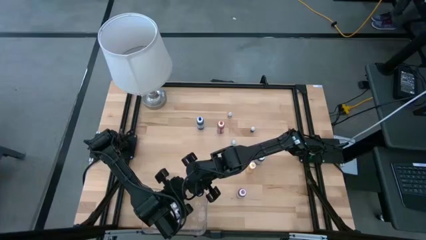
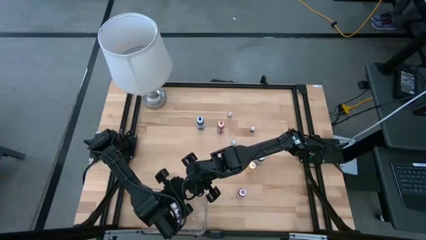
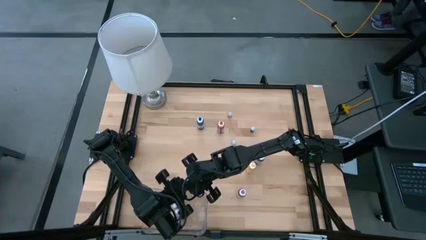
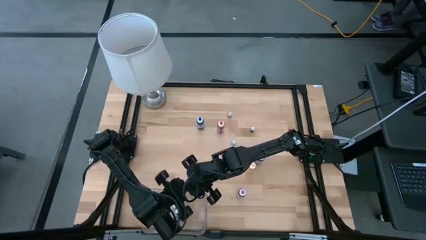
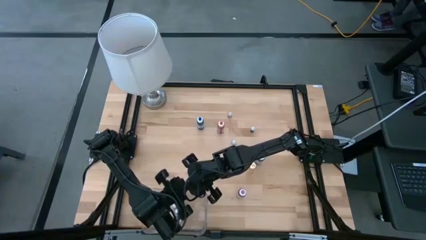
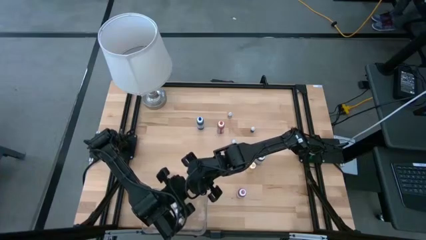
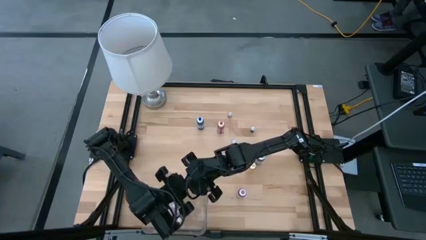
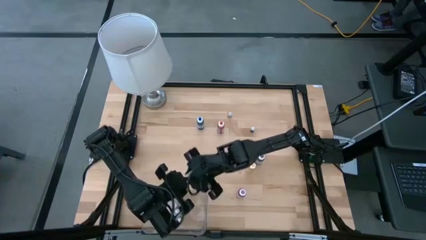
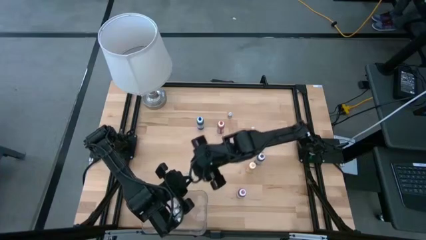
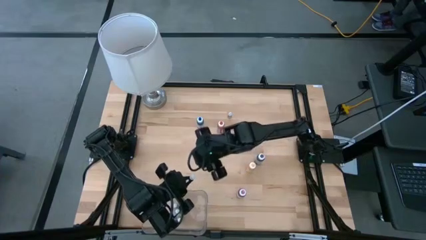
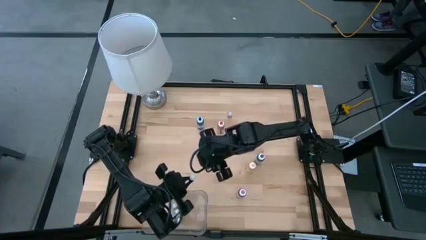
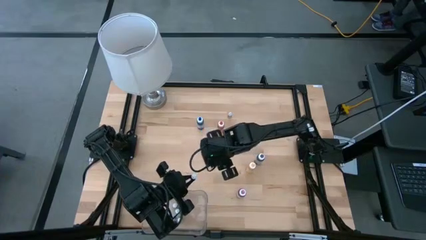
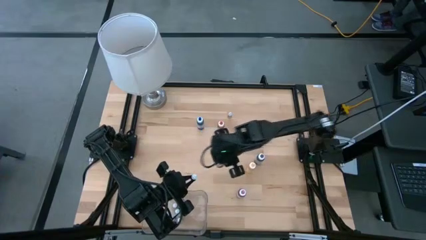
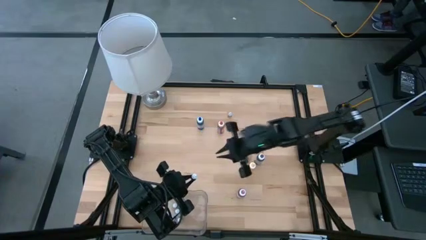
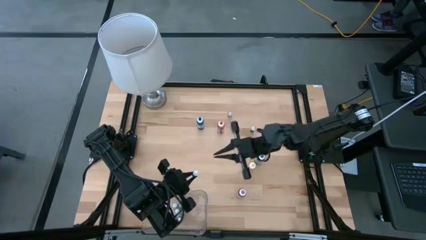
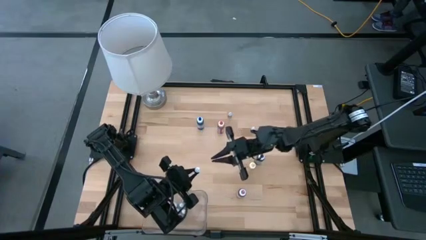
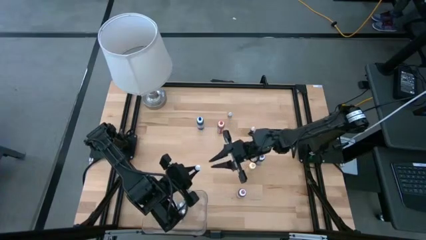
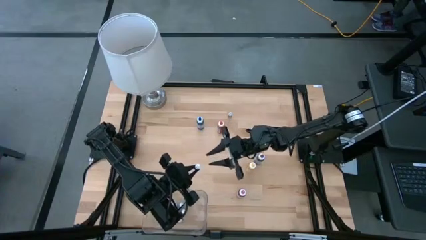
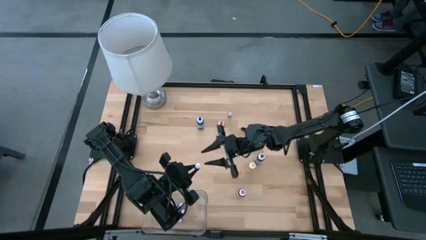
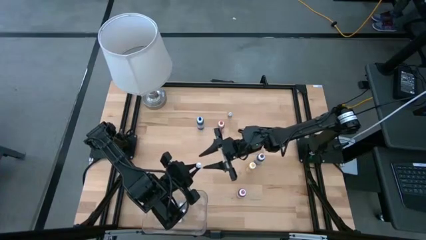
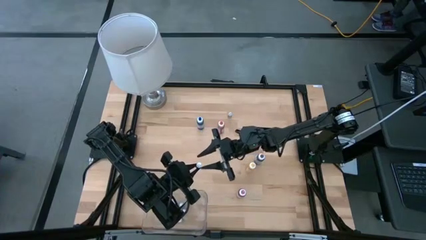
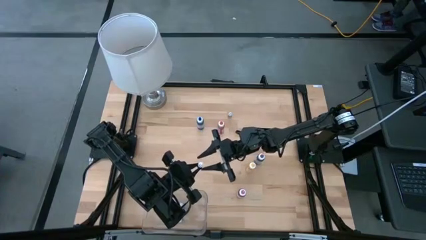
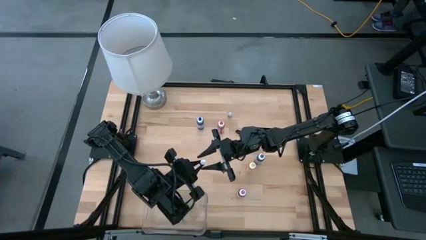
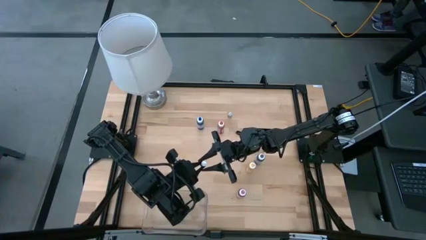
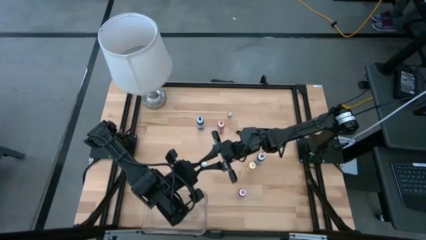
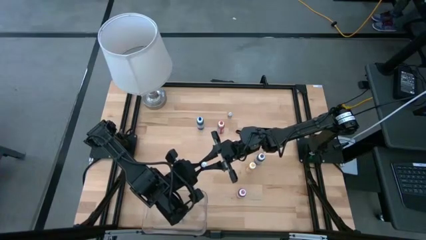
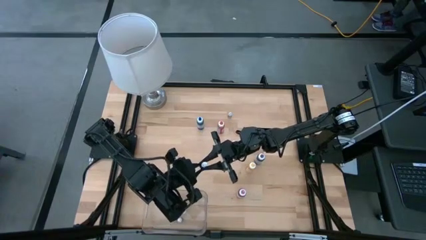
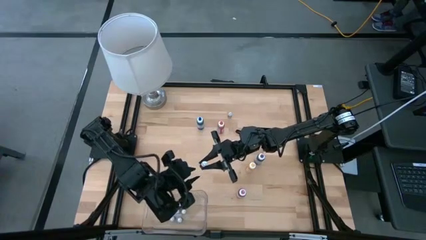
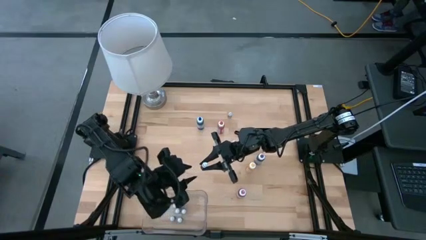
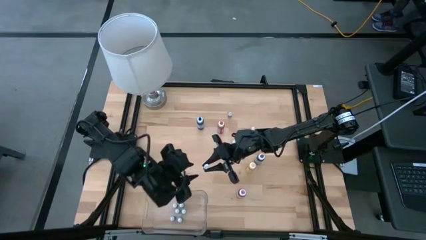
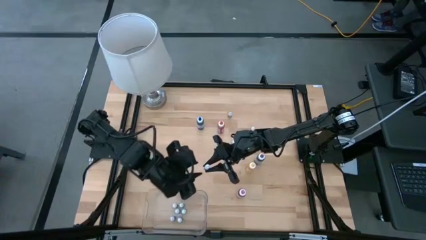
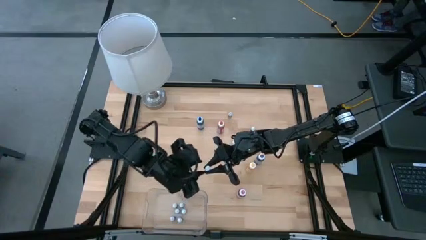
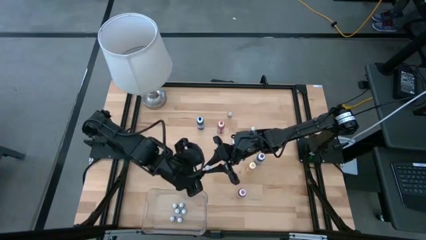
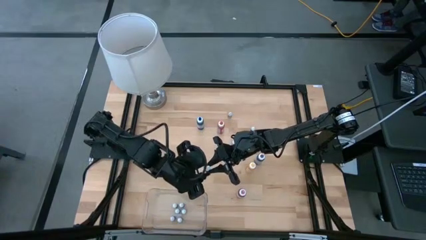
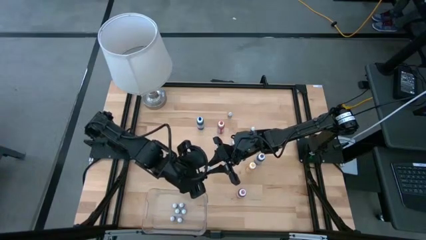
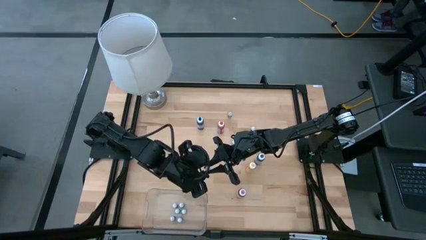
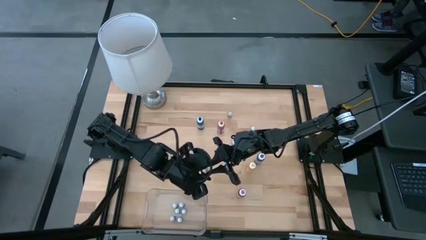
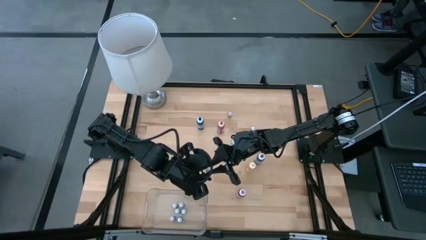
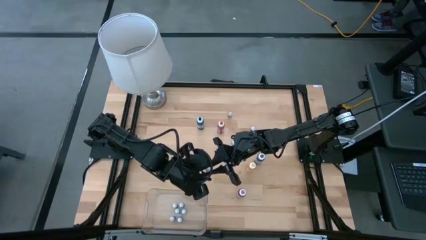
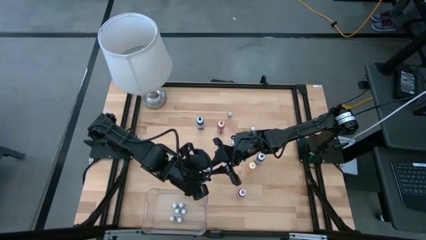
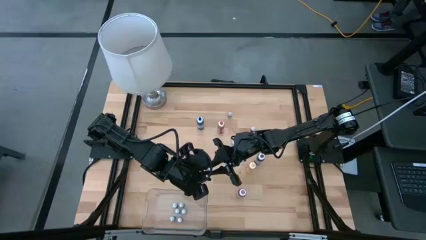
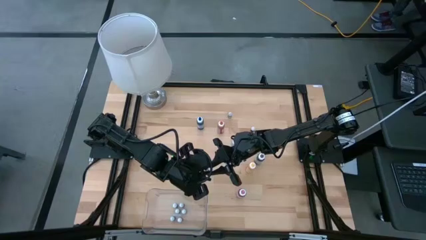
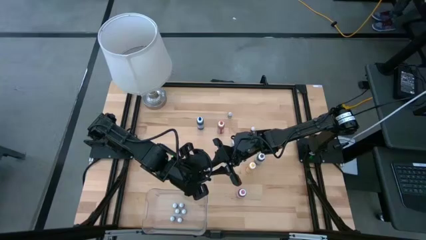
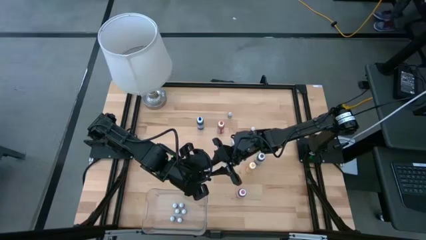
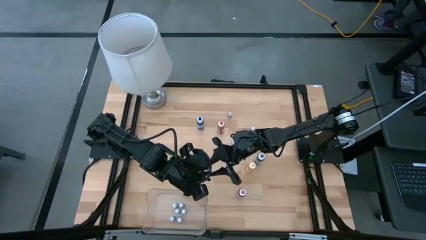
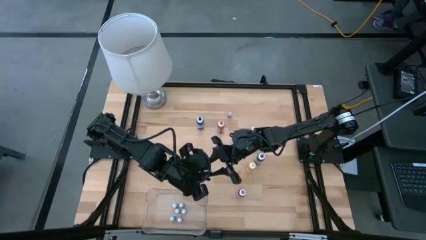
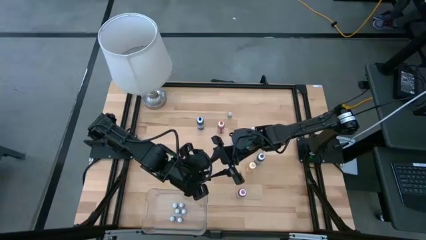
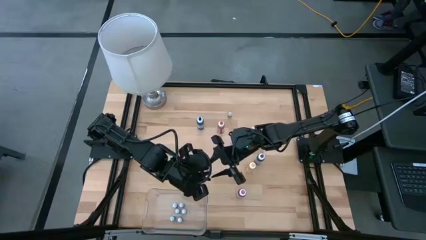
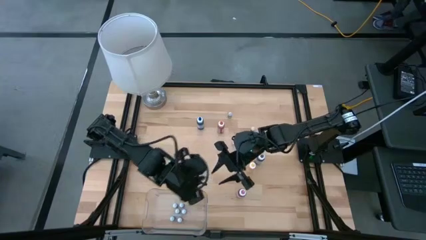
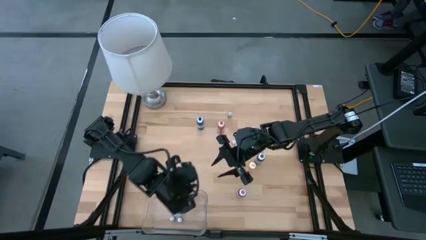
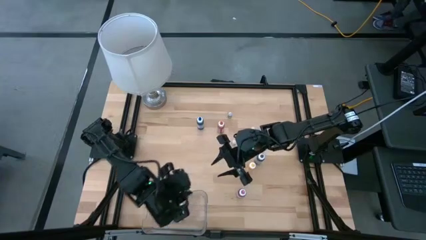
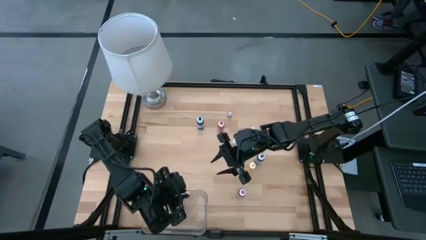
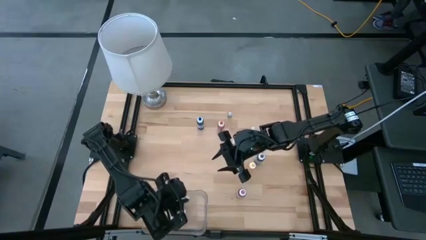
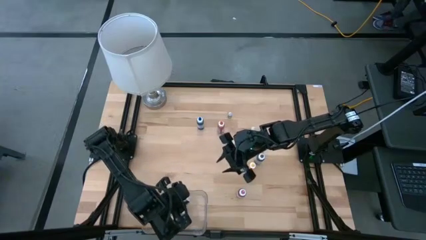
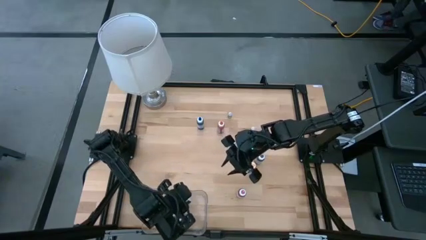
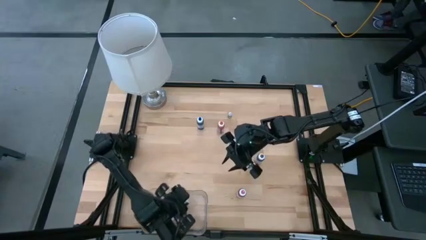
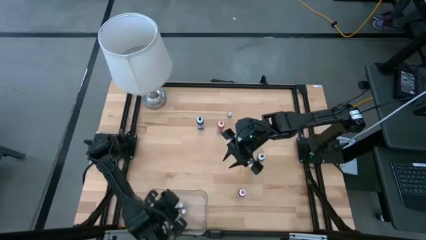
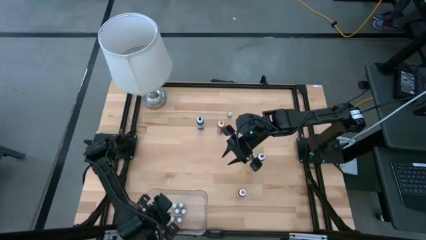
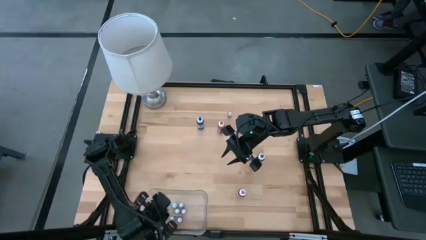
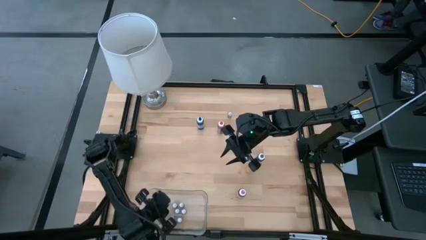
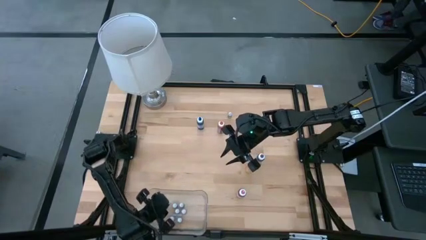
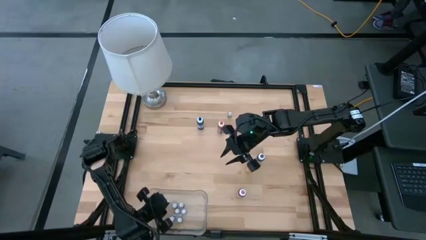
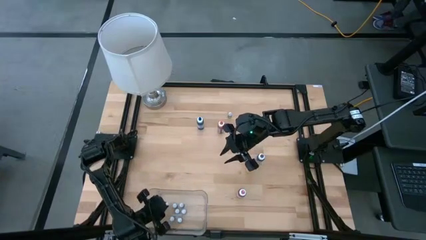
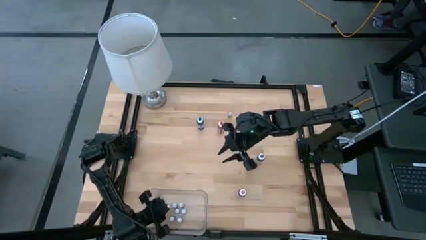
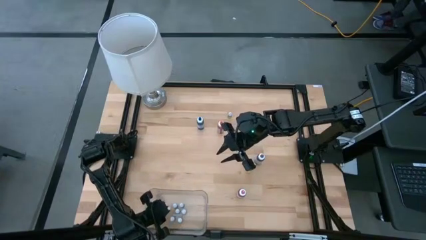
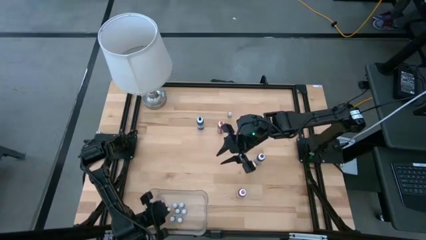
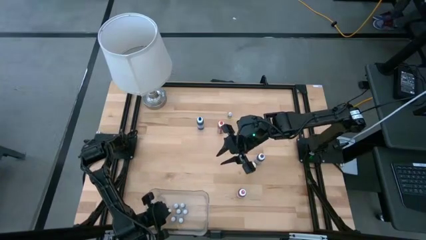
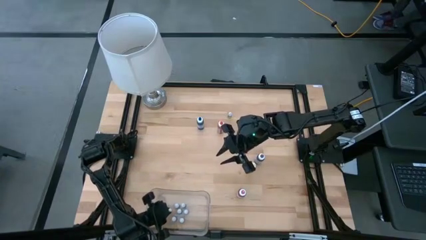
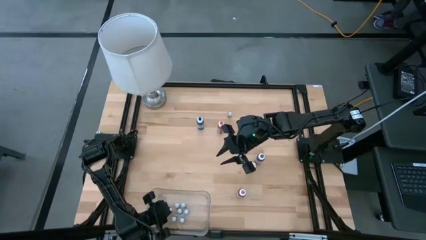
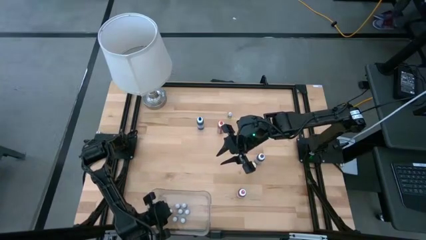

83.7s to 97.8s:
Task: Pick & Place food coloring
Put the small light green food coloring bottle into the bin

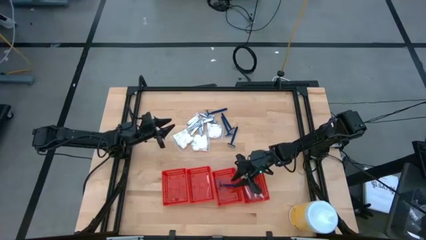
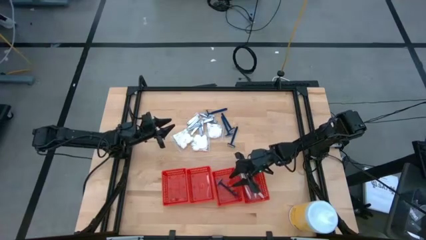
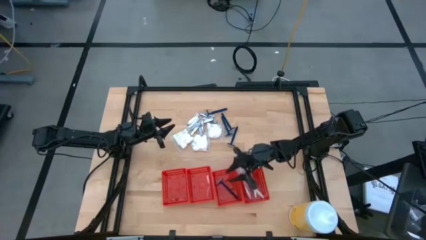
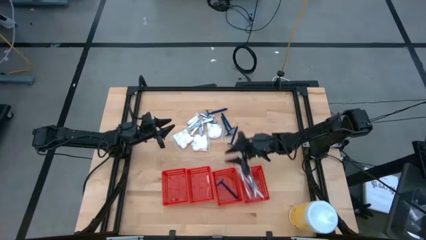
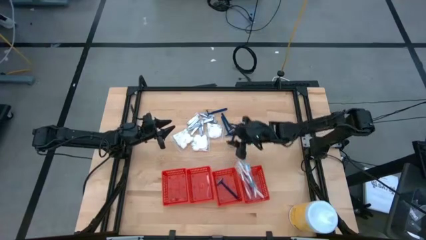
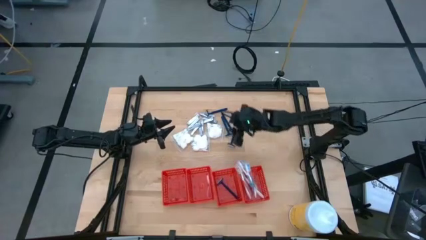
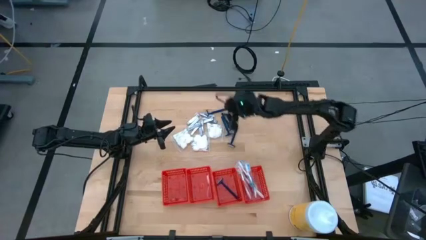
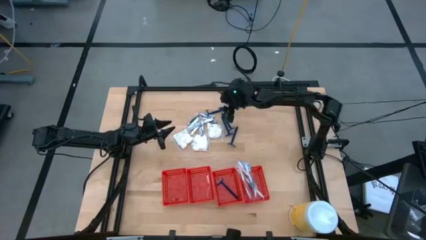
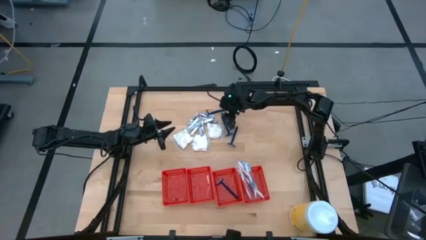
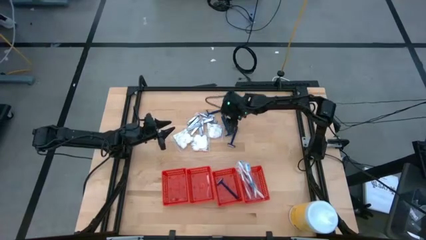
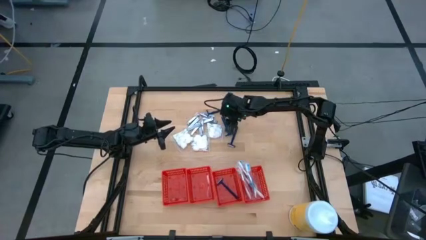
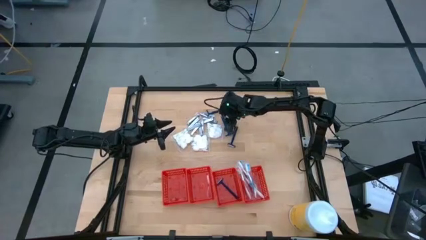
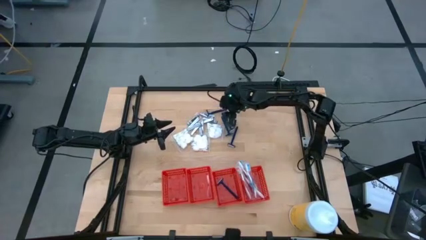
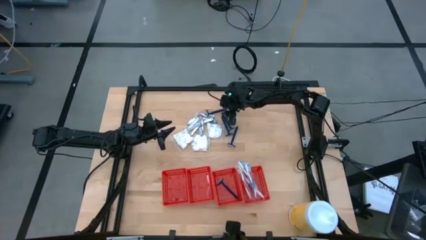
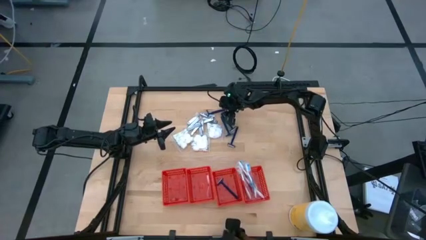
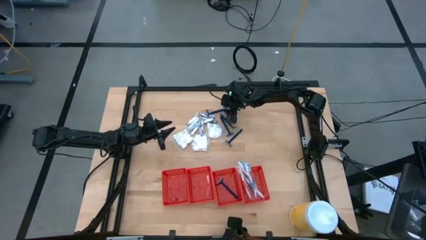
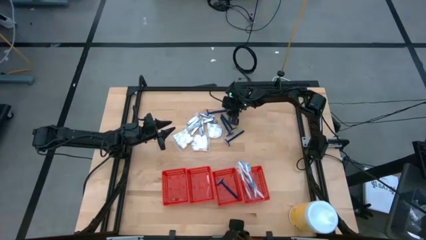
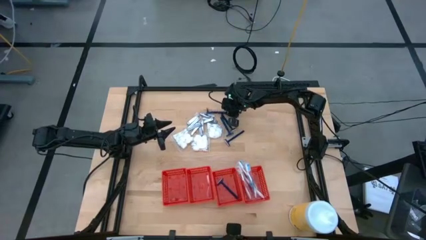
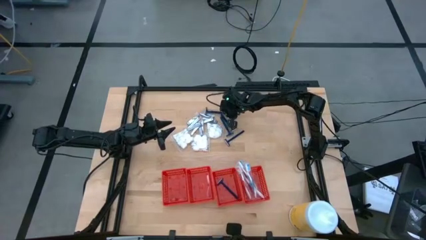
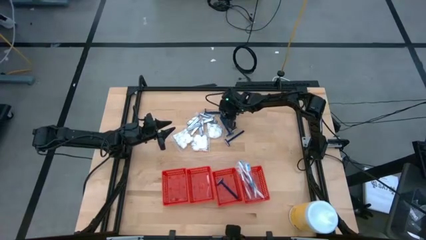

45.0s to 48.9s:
Task: Pick & Place Travel size toiletries
Put the blue razor into the middle right red bin
